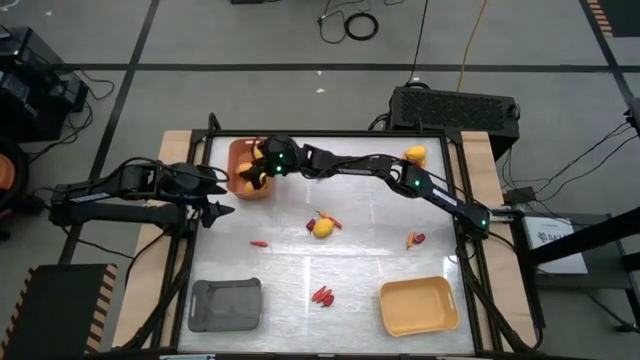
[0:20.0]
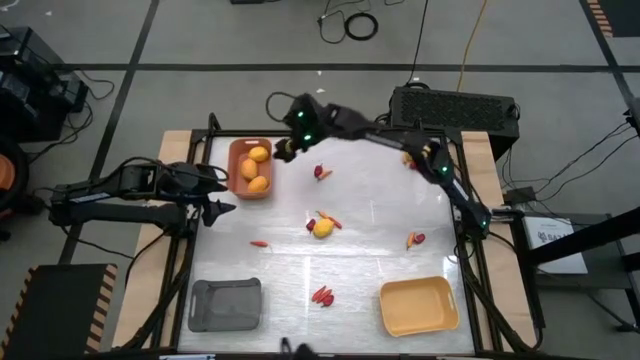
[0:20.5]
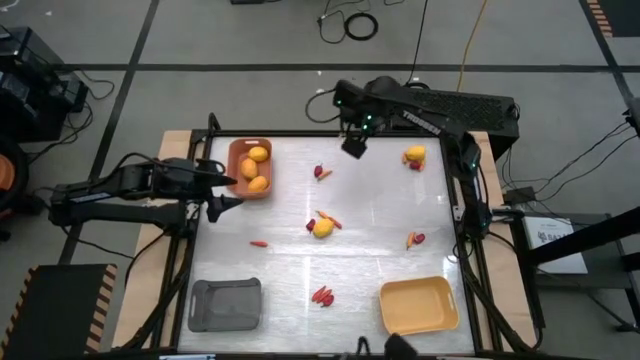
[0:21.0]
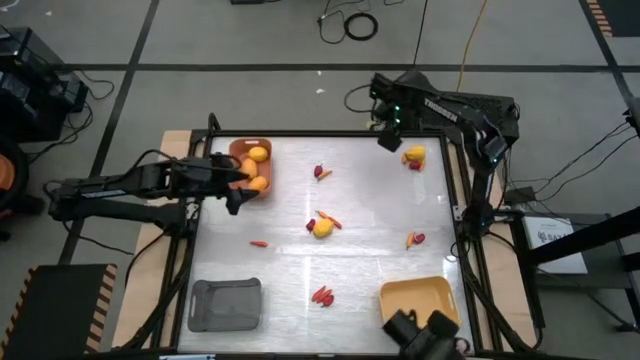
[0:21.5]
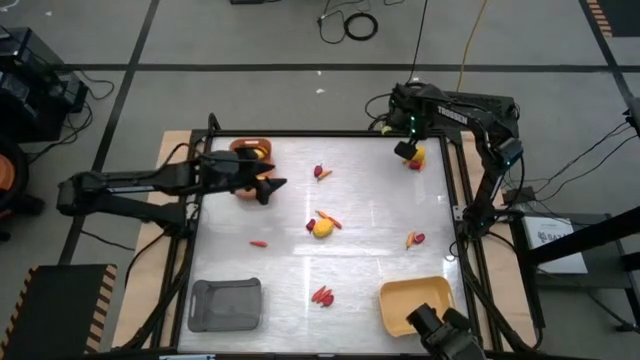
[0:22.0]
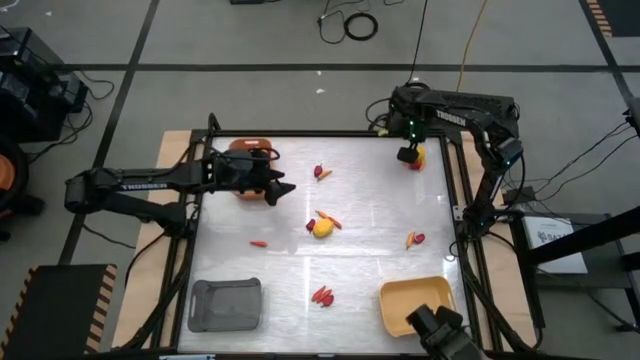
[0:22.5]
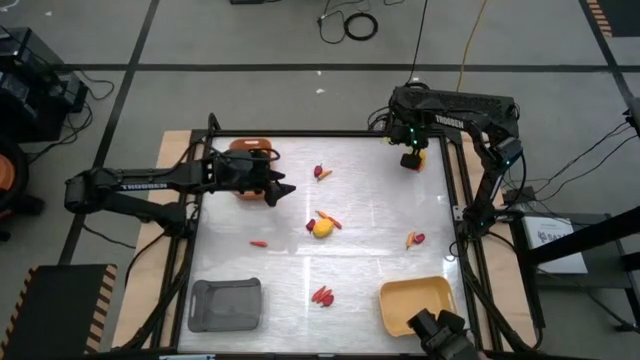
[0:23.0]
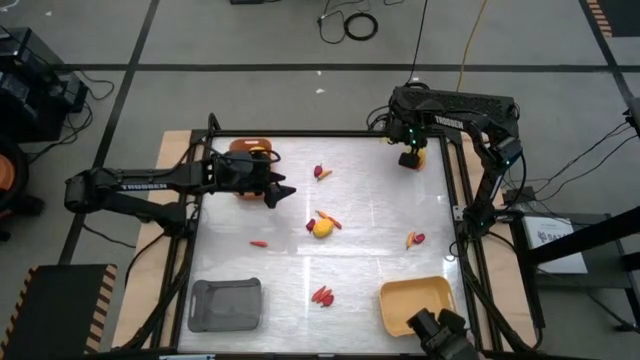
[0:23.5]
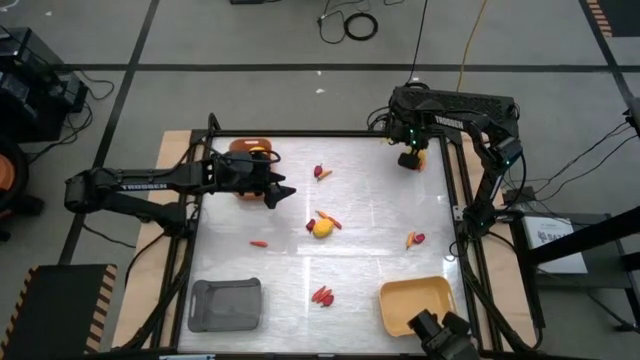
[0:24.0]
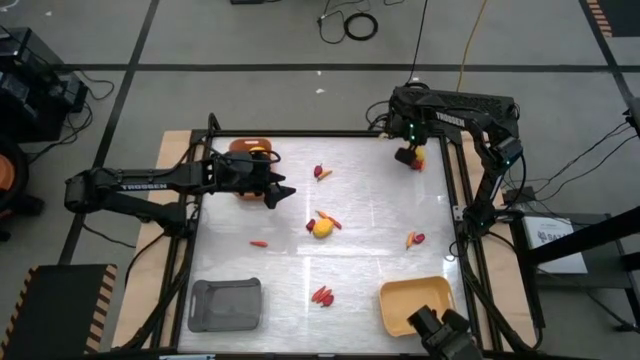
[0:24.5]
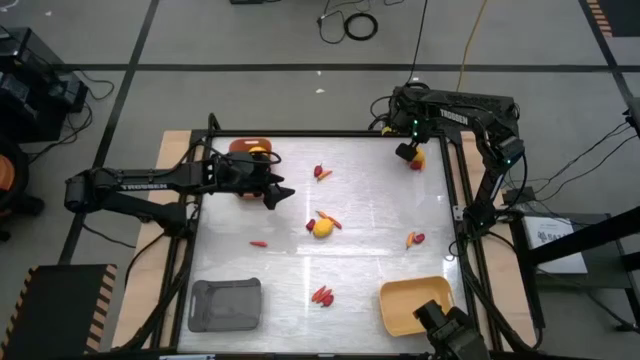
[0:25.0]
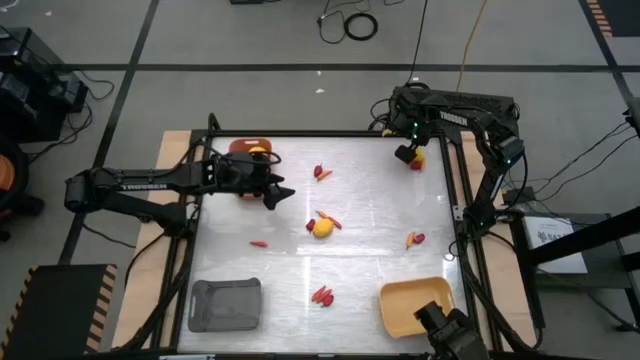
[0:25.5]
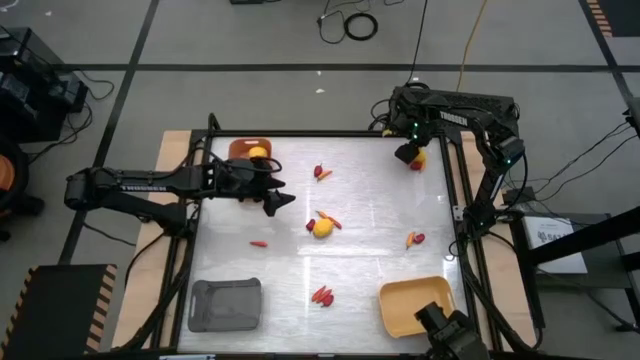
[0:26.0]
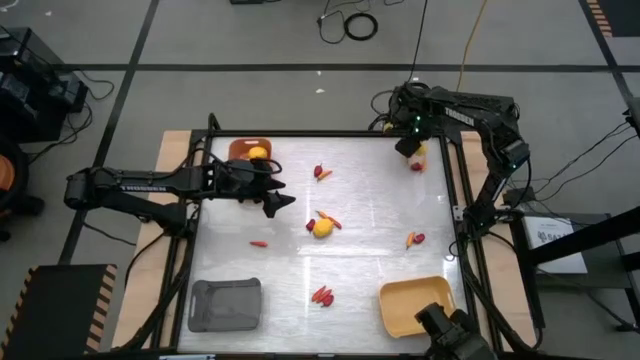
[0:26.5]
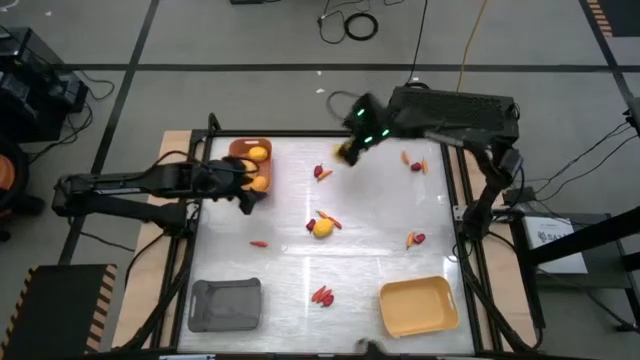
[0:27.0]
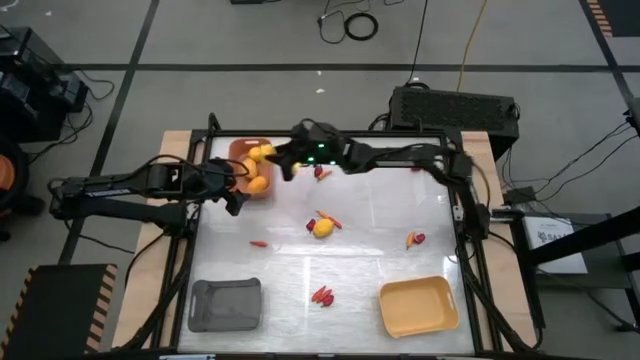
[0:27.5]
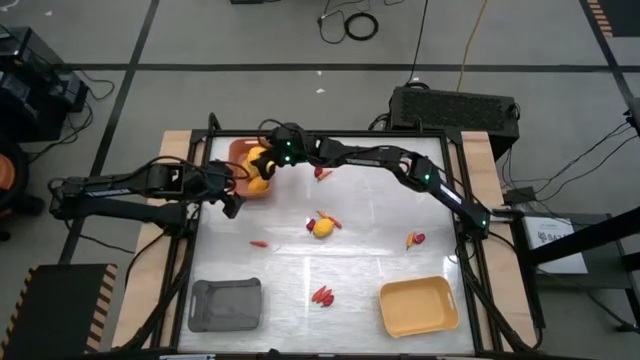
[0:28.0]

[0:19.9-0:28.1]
Task: Sort produce into baskets
Put the lemon into the orange bin

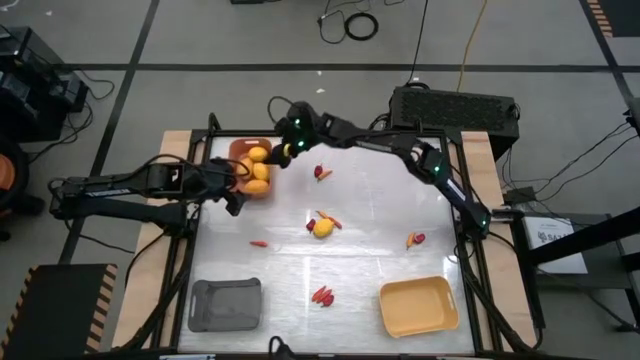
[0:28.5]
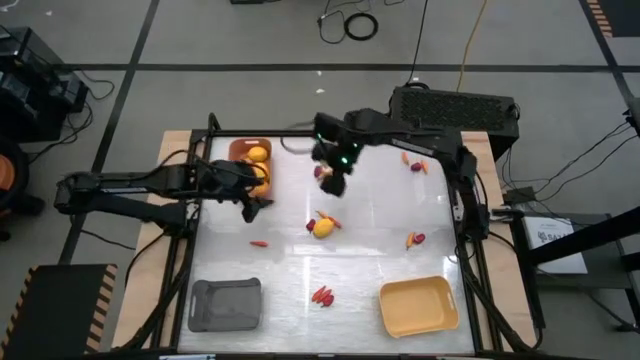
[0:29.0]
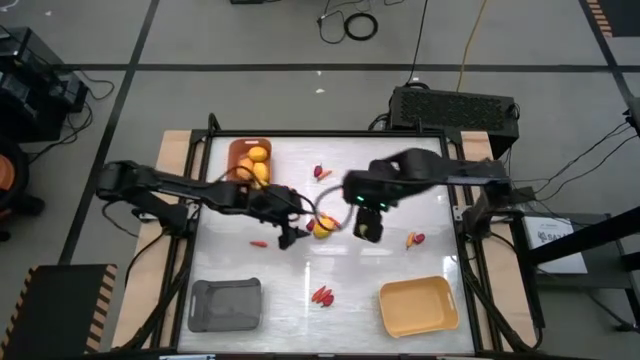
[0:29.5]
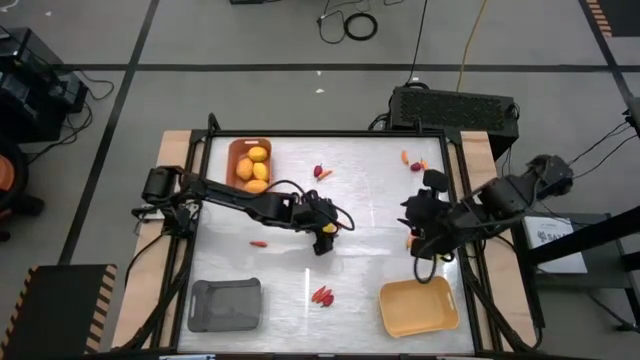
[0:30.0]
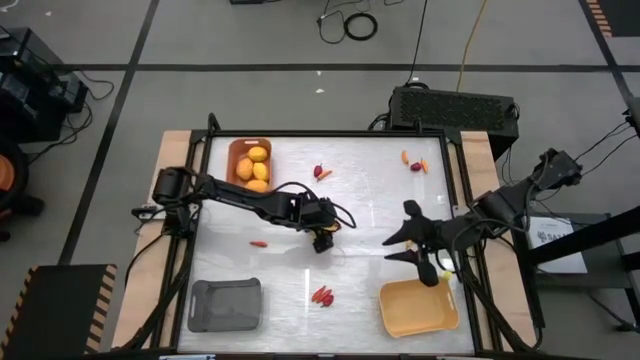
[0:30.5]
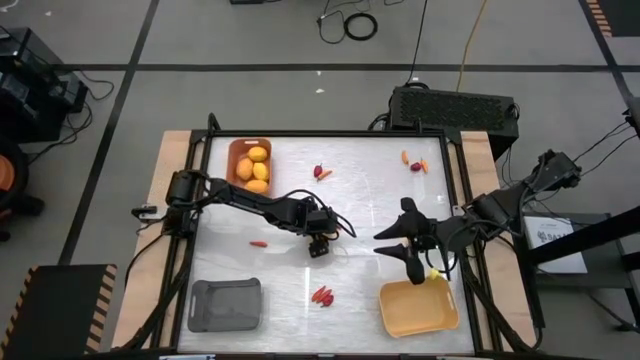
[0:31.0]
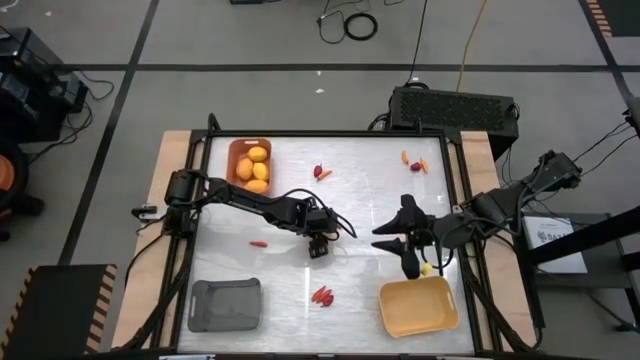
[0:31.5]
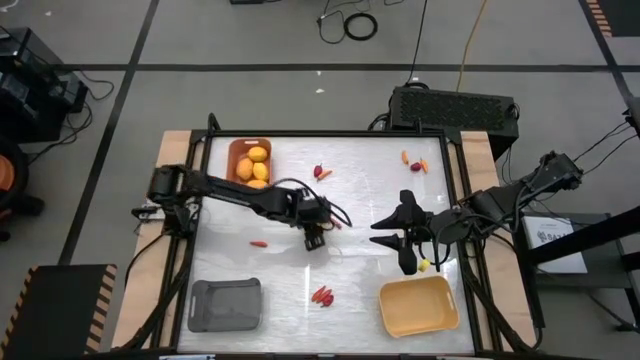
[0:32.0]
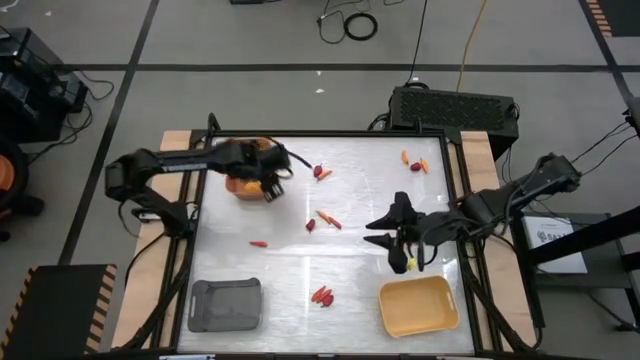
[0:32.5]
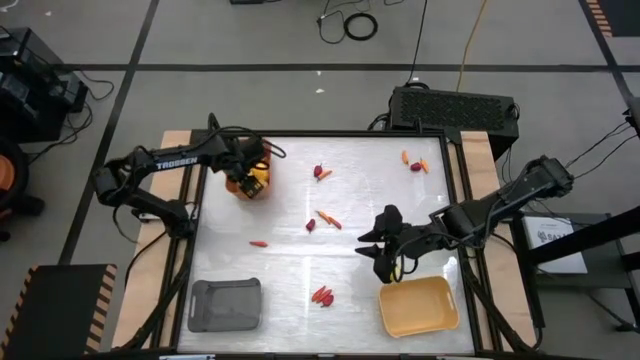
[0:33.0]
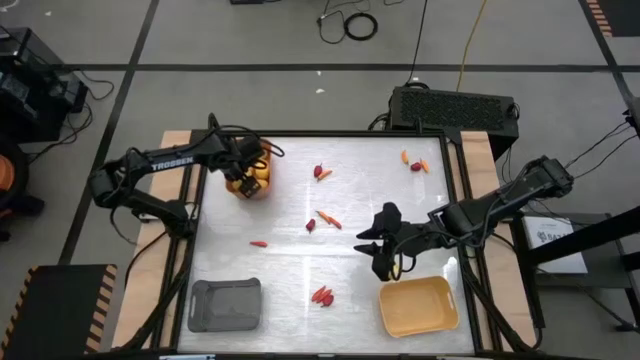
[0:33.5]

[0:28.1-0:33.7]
Put the lemon into the orange bin

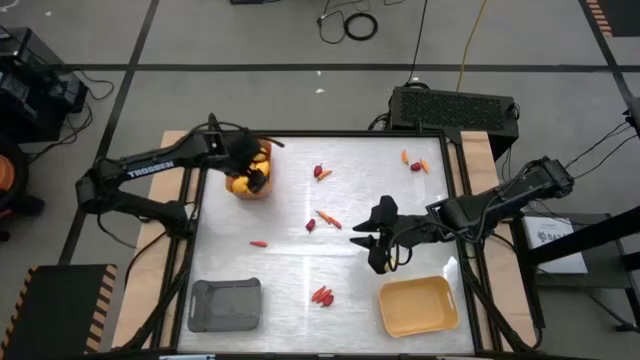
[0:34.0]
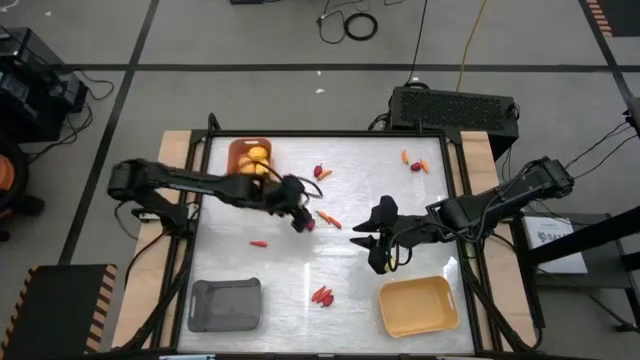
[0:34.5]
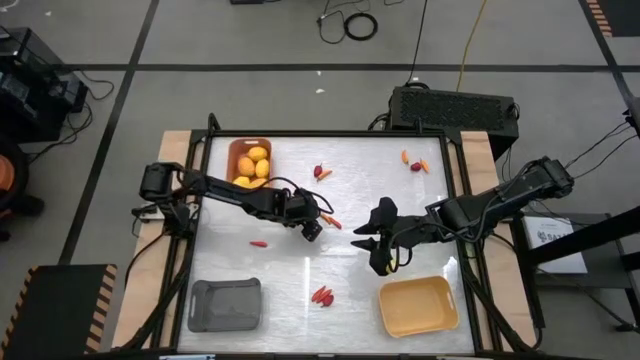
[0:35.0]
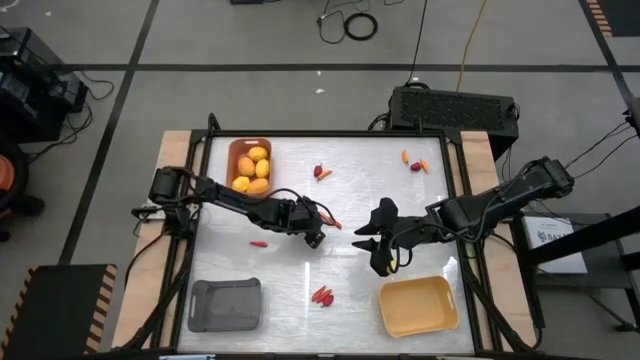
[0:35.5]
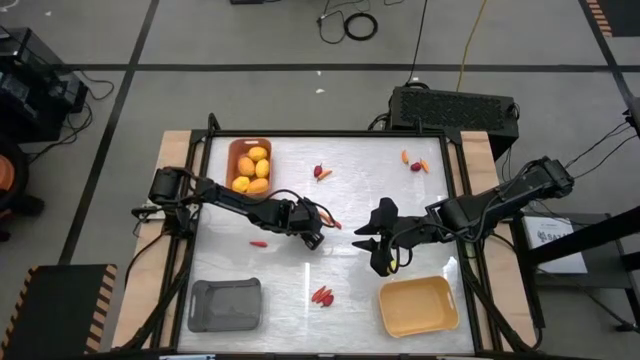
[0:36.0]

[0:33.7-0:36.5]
Put the red bell pepper into the black bin

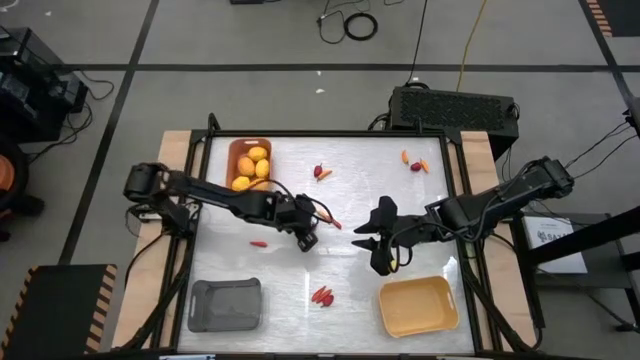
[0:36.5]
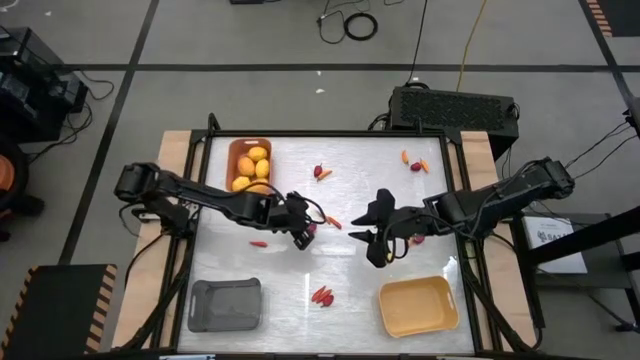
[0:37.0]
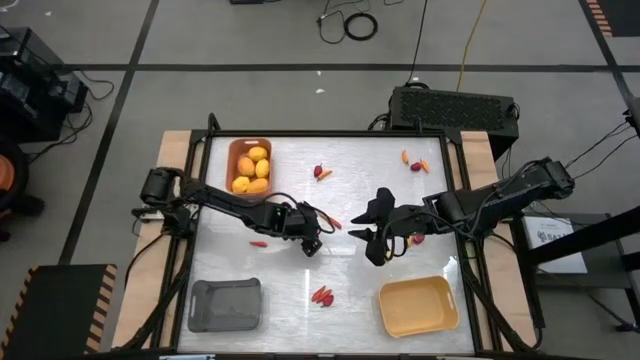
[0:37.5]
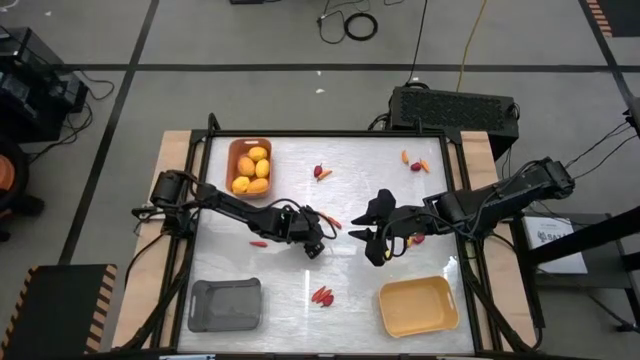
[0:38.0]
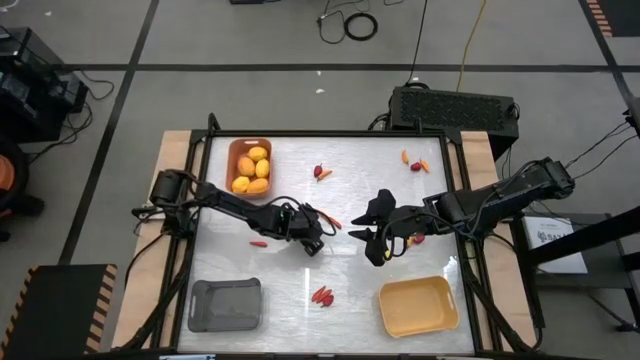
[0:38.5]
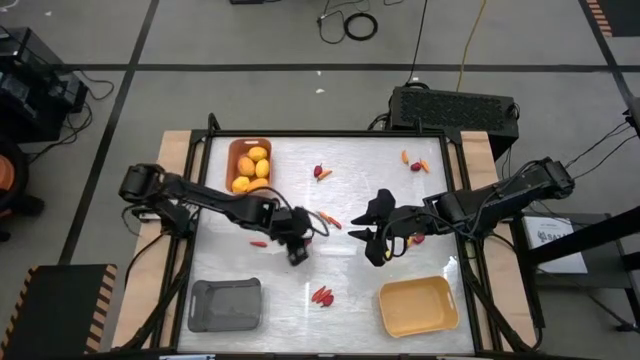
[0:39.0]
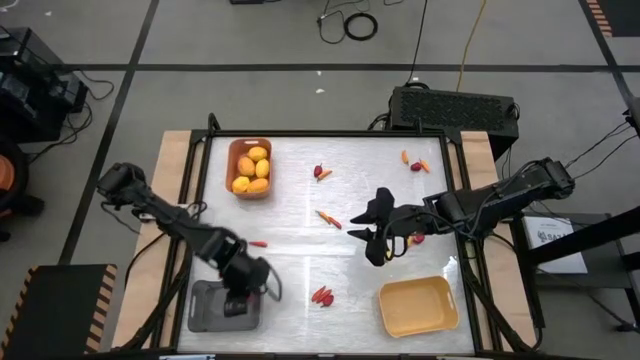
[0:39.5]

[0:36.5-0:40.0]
Put the red bell pepper into the black bin
